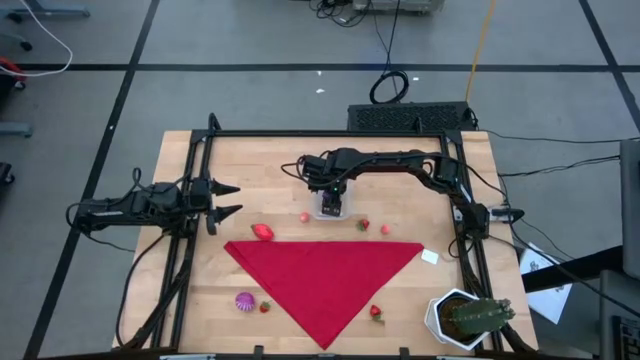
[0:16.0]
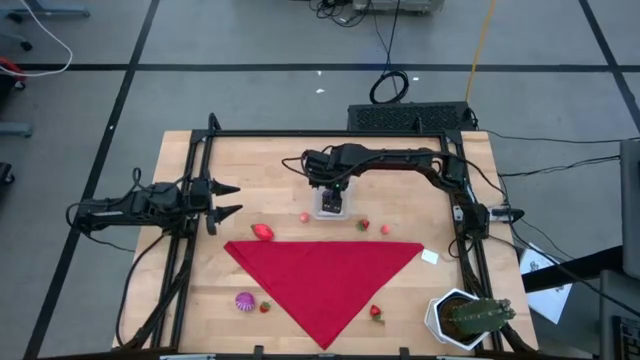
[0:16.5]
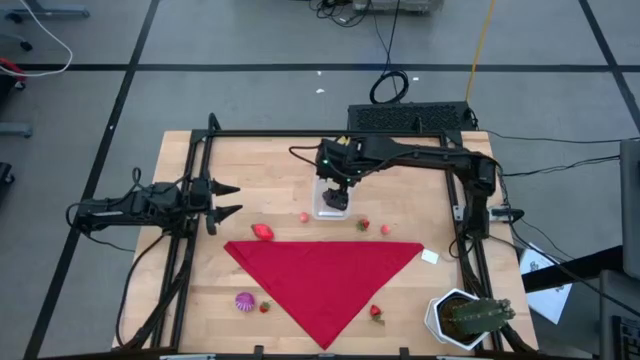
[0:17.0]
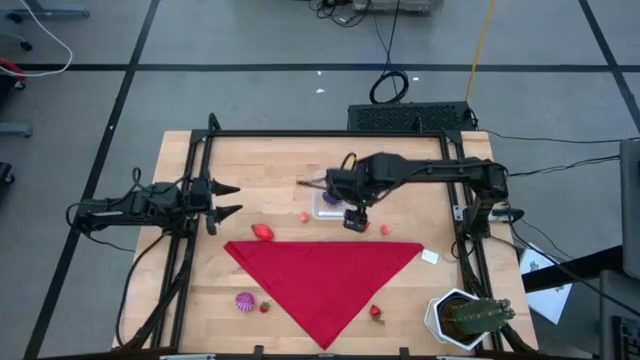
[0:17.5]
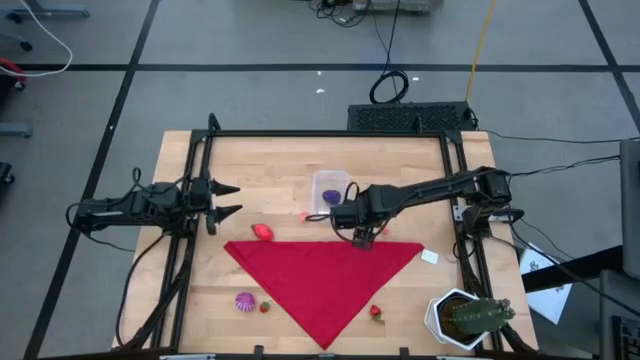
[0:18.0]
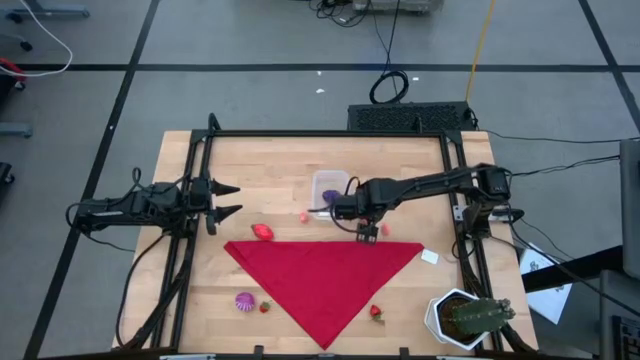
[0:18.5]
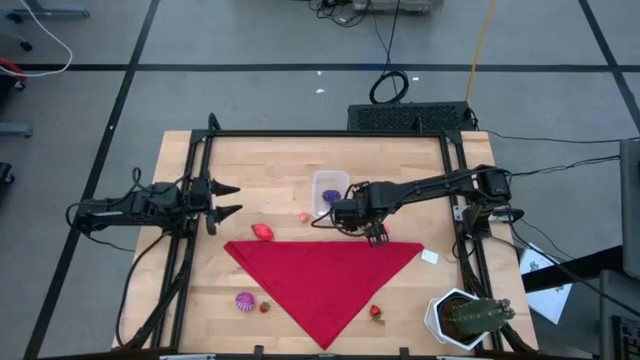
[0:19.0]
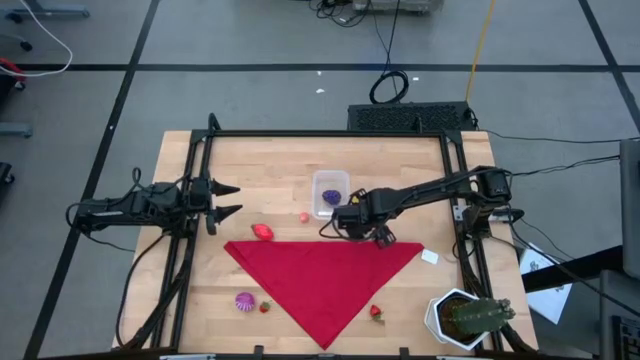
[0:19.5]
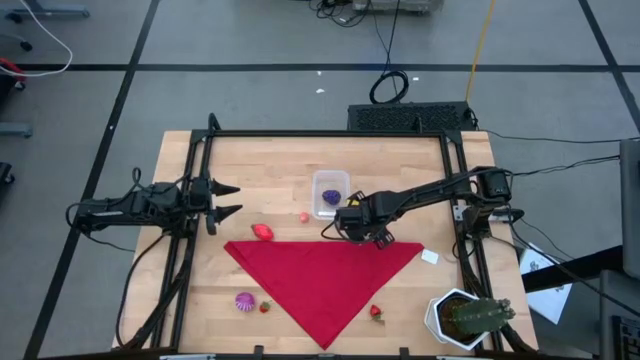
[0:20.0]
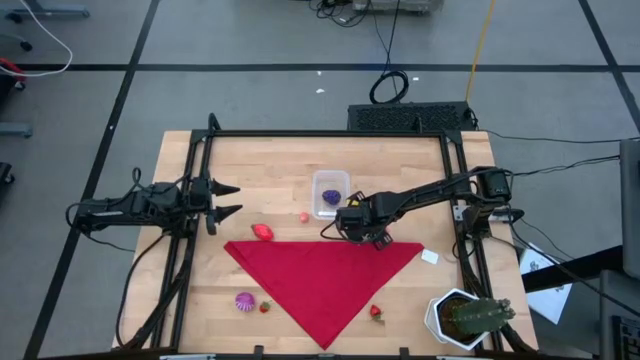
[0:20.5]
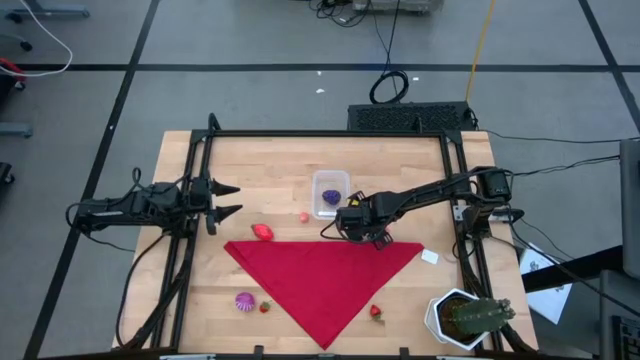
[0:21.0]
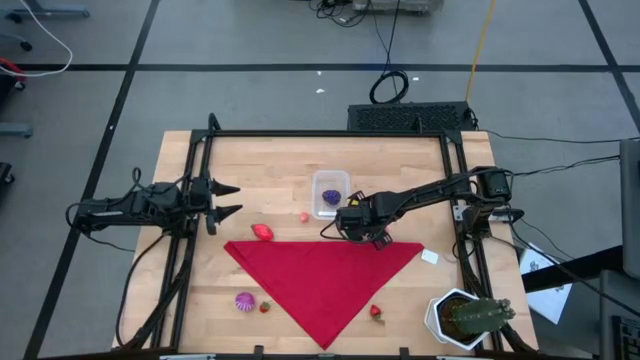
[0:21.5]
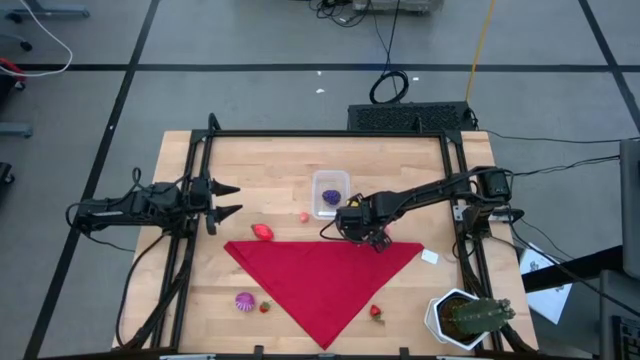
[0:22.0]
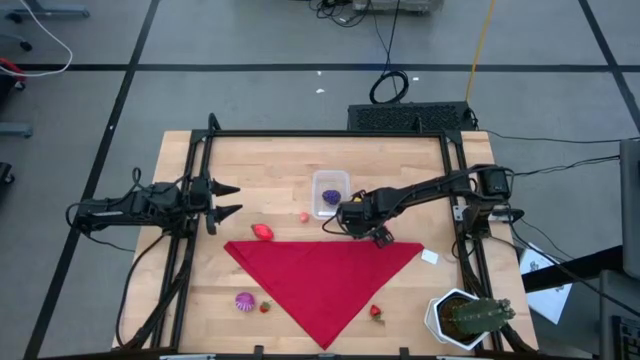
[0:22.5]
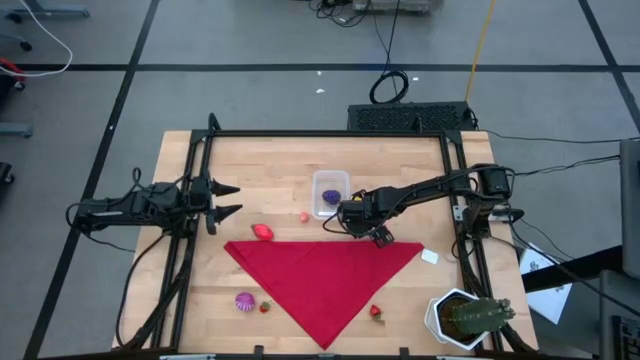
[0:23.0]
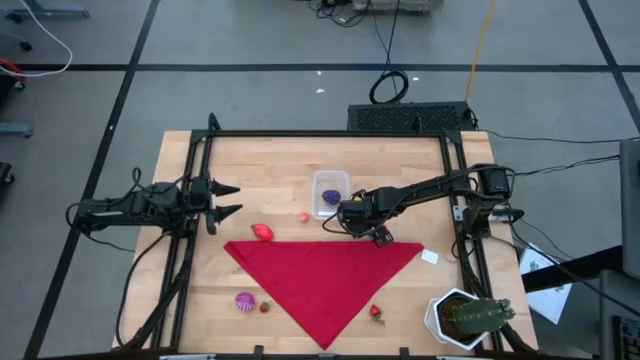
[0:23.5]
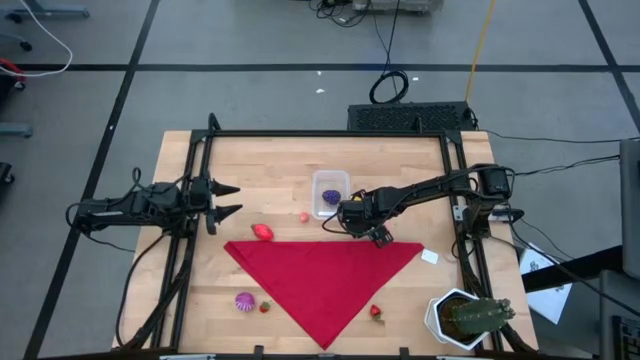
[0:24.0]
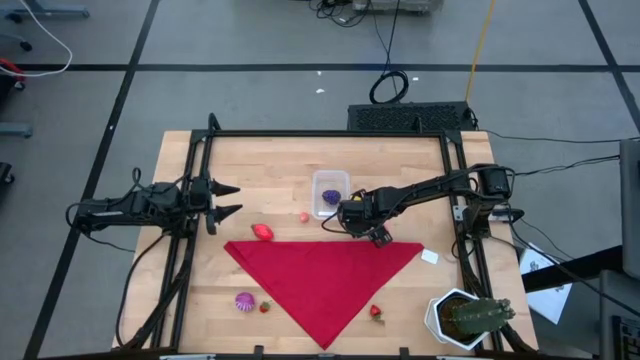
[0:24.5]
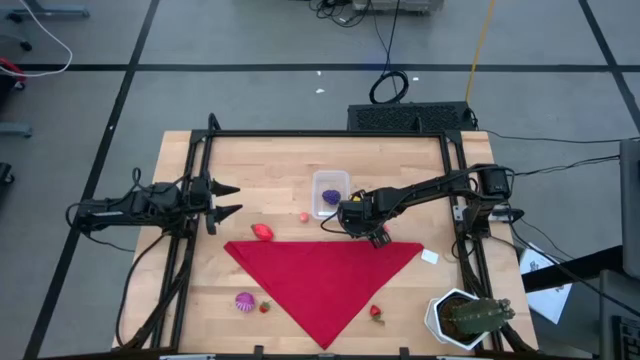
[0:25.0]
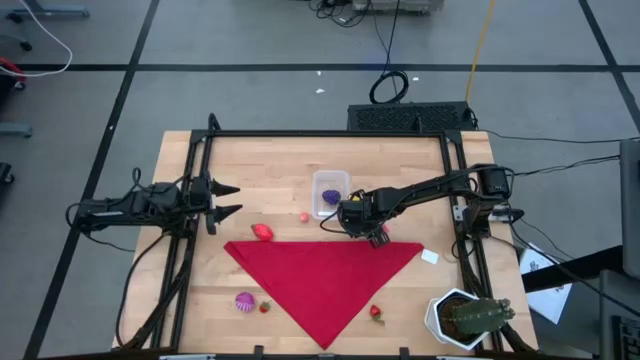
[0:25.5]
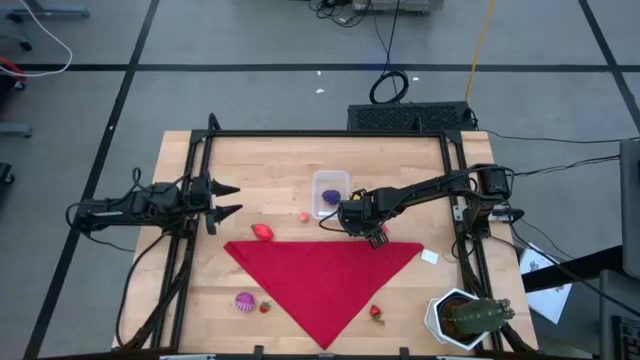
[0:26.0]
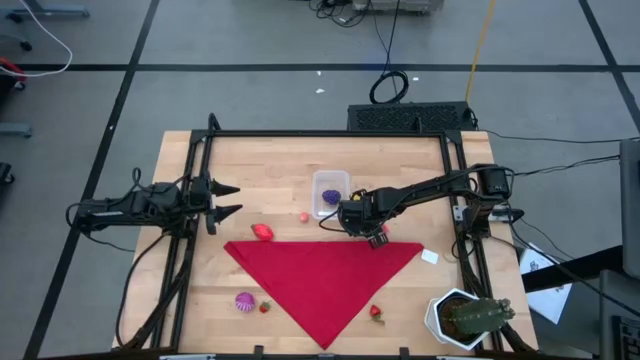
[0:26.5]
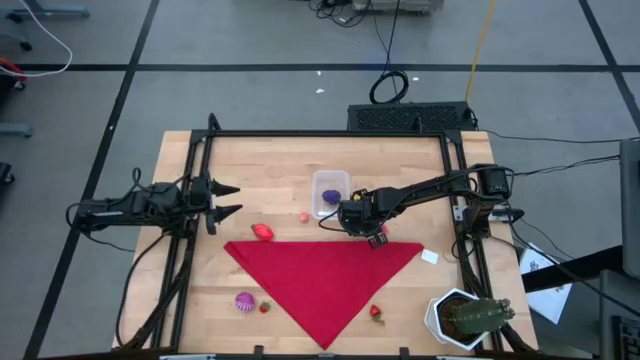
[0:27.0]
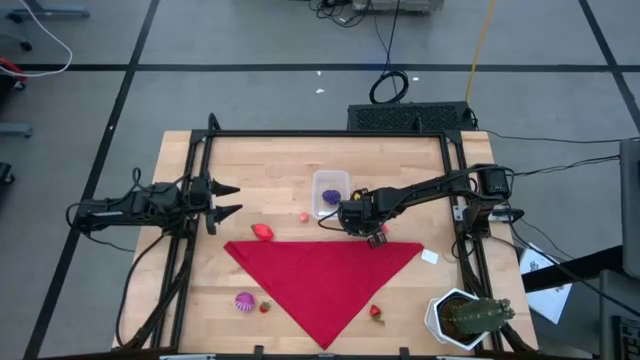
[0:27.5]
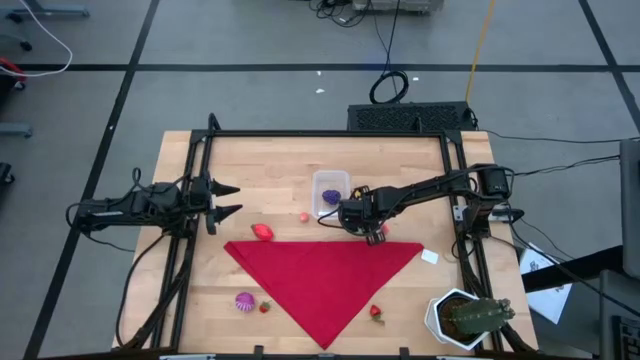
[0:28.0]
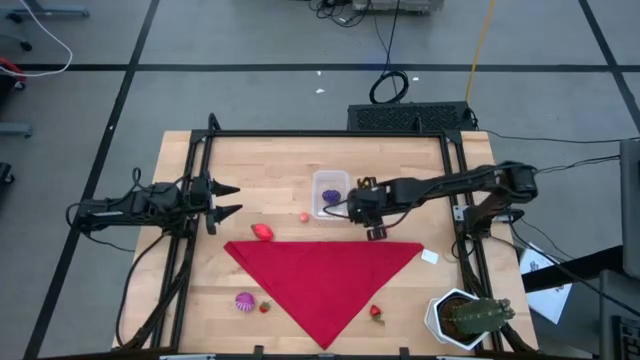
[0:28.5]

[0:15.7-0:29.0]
Task: Pick and placing Produce into tupperware
Put the top right red strawberry into the transparent bin

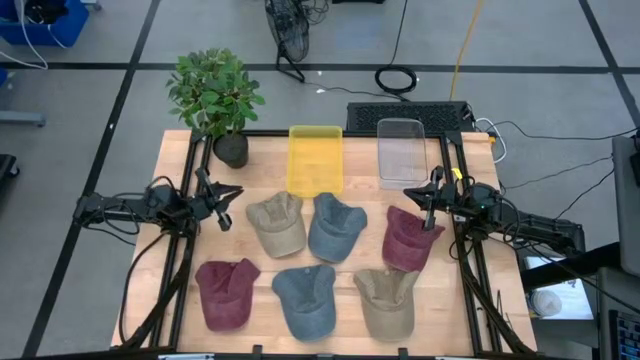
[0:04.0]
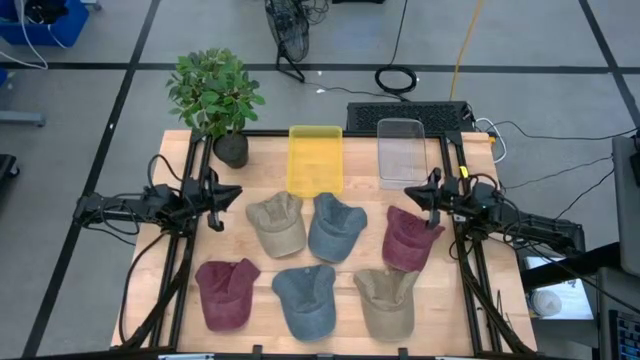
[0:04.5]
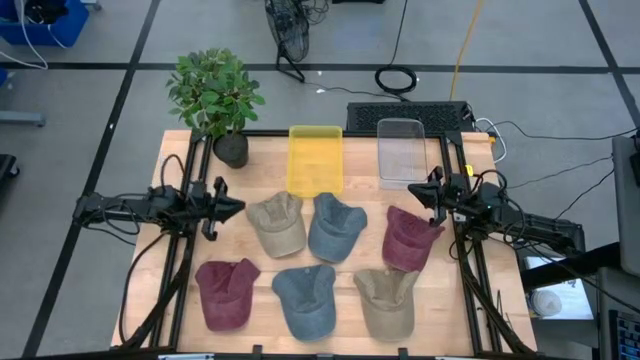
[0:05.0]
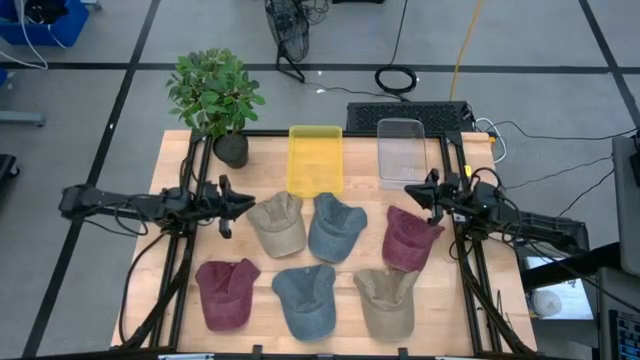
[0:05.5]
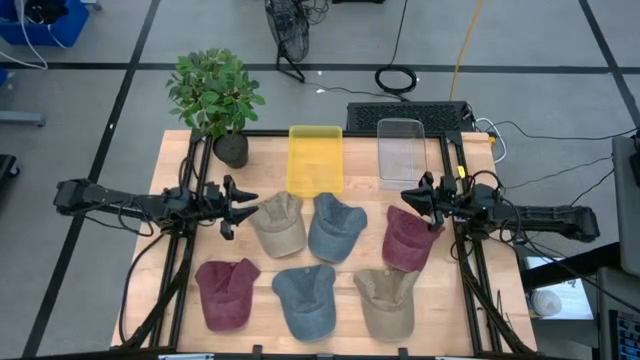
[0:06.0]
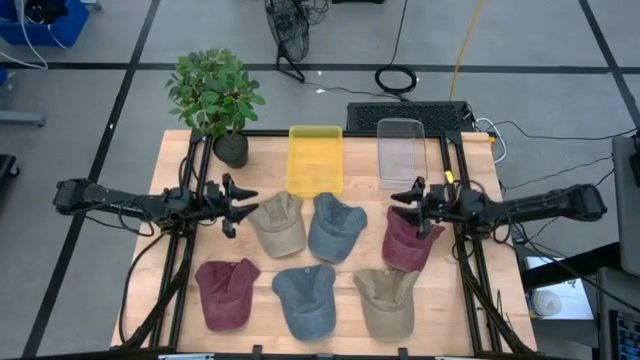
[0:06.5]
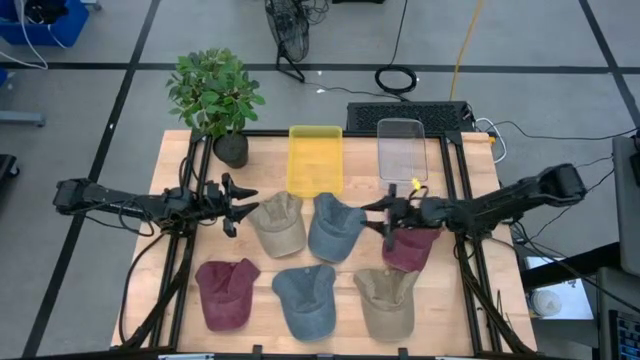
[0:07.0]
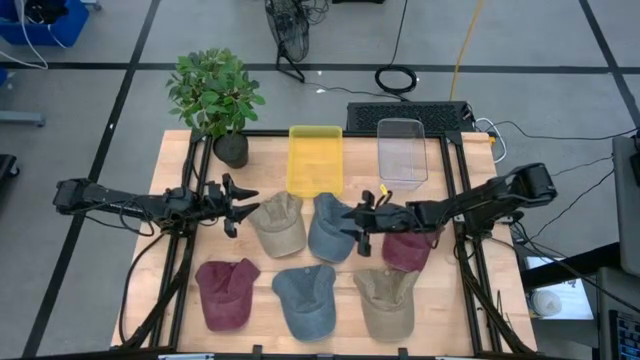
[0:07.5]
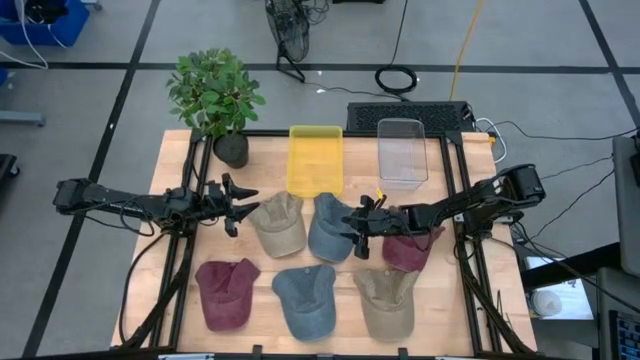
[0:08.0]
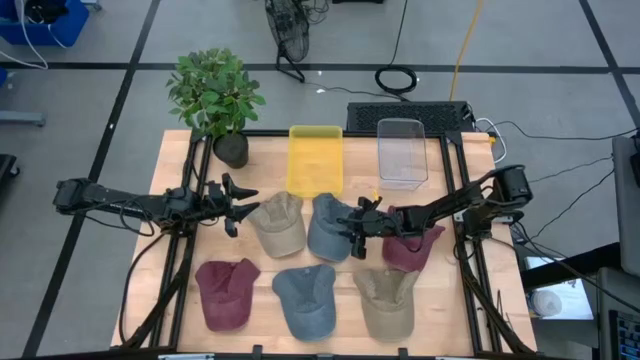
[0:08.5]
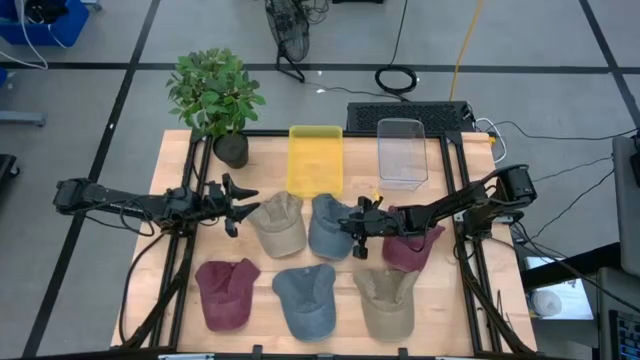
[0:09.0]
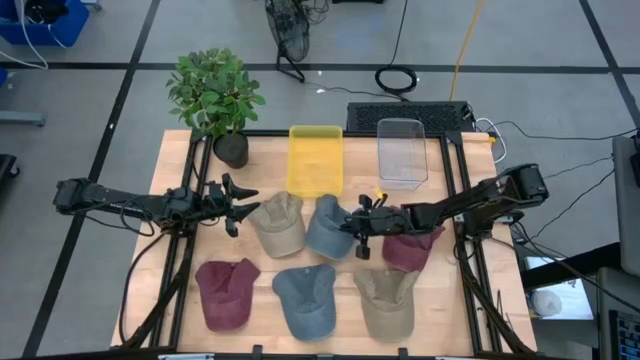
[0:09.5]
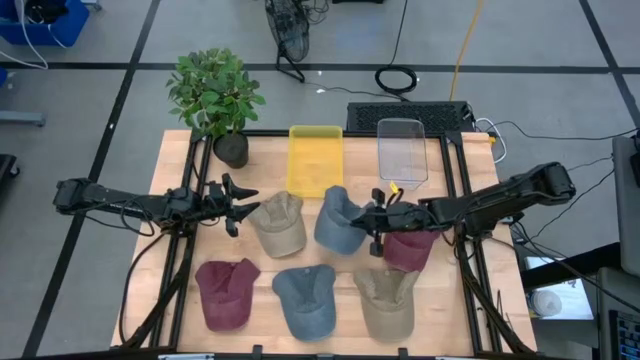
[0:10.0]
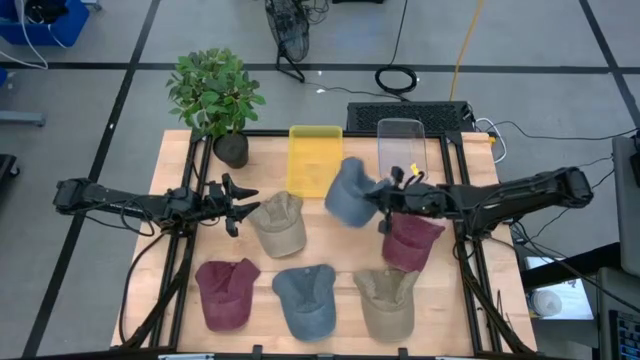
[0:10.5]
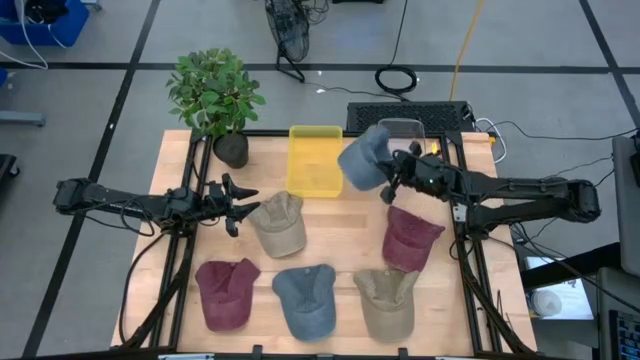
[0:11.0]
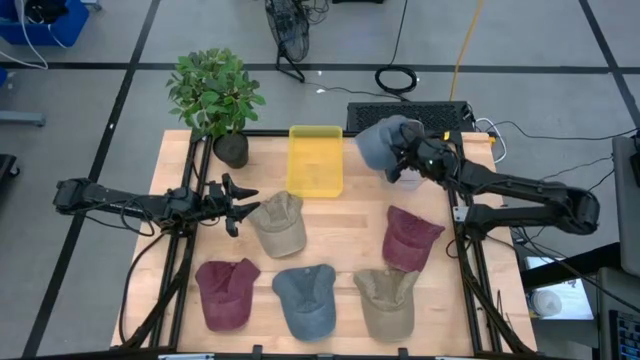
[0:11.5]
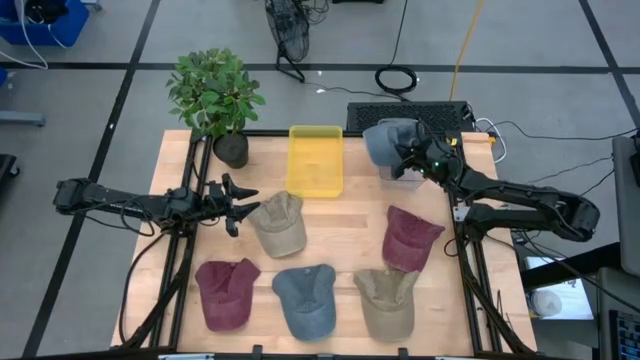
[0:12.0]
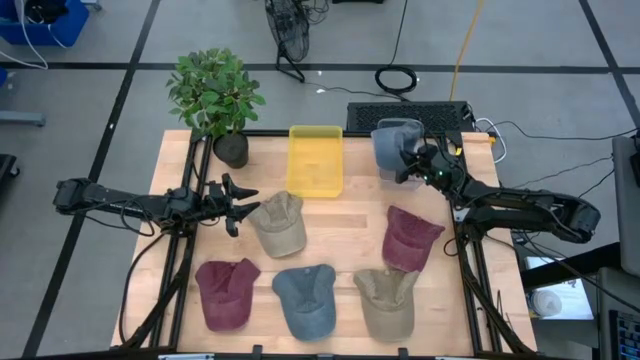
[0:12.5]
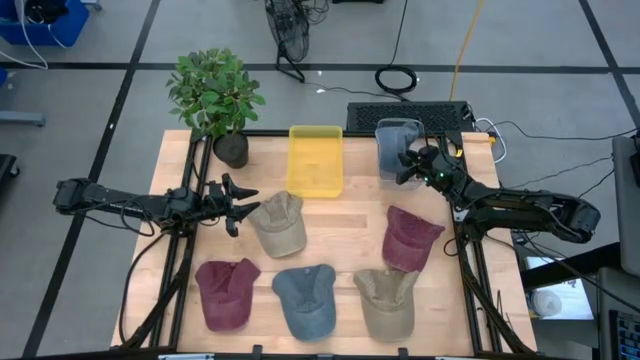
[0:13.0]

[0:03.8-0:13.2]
Task: Pick & Place hat
Put the top blue cap into the transparent bin
